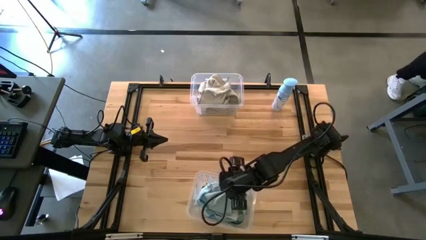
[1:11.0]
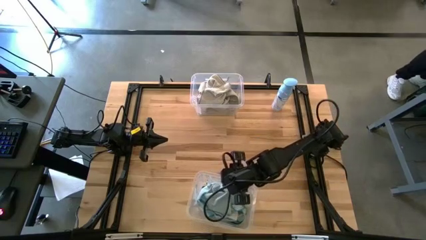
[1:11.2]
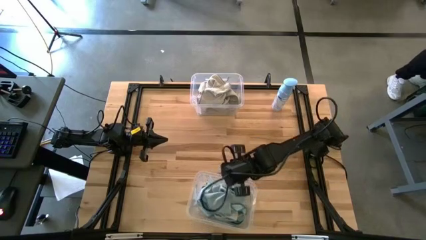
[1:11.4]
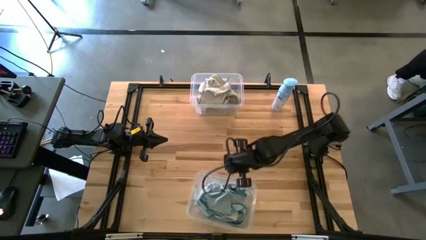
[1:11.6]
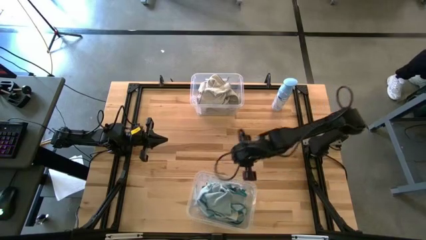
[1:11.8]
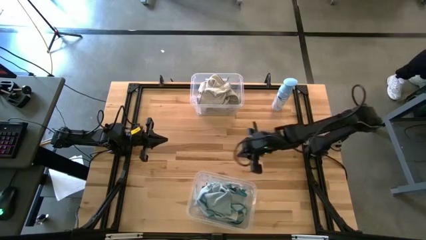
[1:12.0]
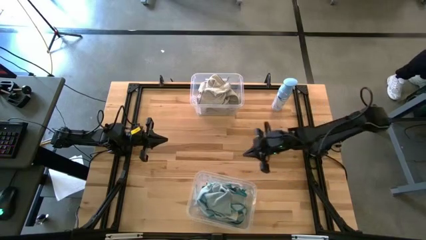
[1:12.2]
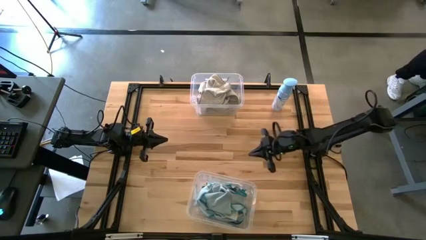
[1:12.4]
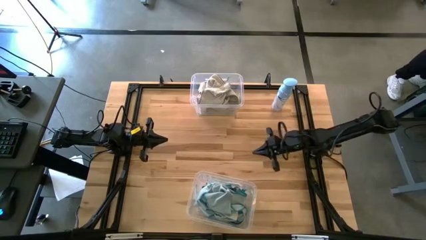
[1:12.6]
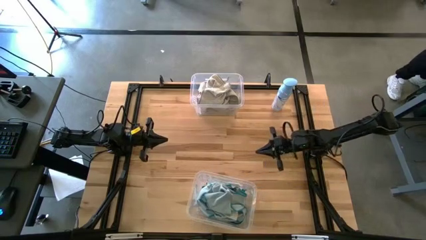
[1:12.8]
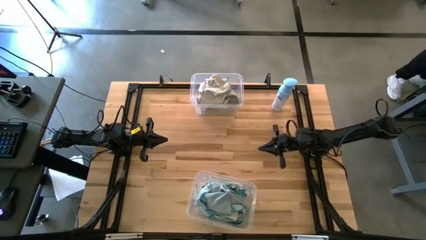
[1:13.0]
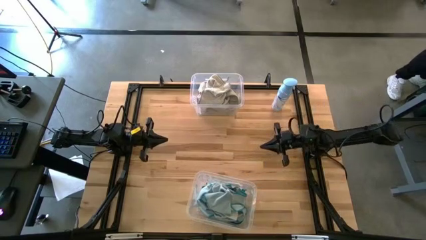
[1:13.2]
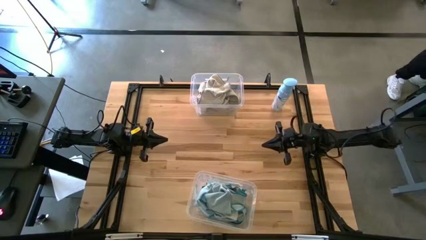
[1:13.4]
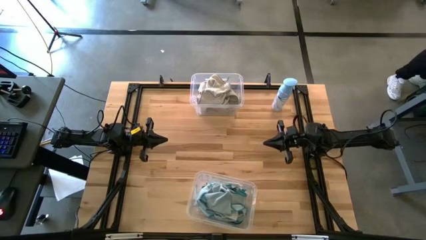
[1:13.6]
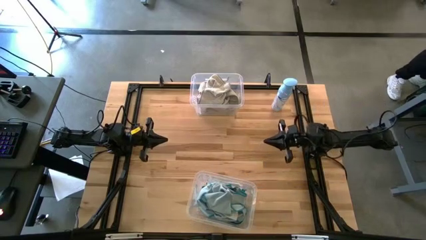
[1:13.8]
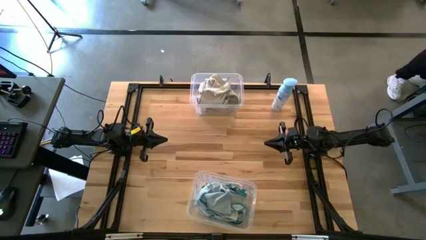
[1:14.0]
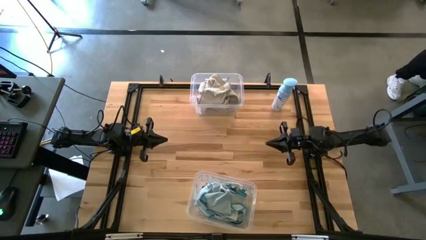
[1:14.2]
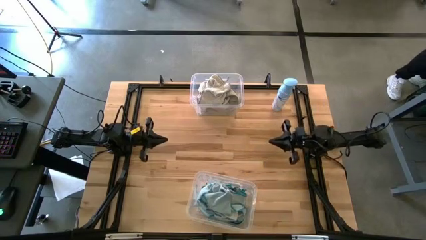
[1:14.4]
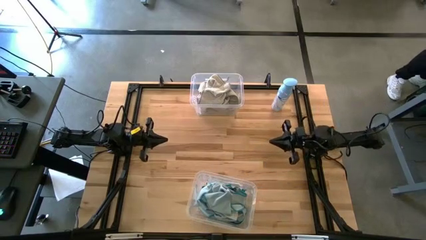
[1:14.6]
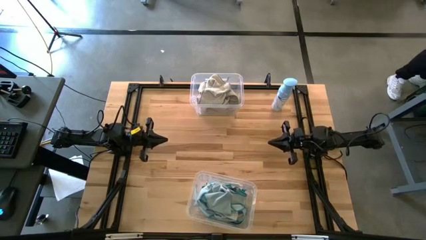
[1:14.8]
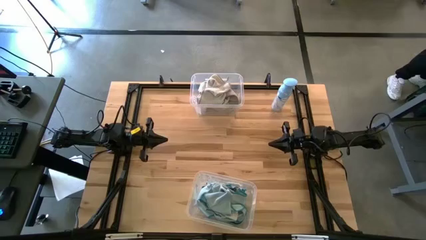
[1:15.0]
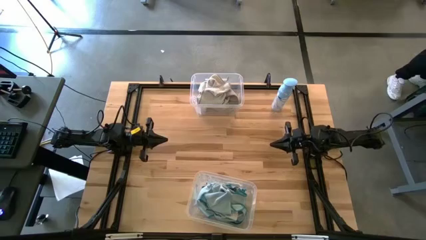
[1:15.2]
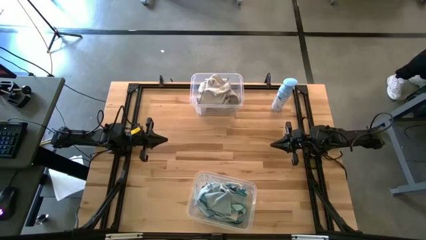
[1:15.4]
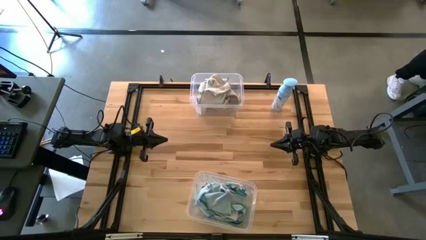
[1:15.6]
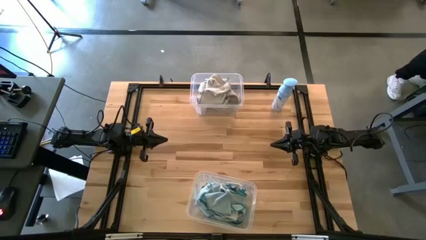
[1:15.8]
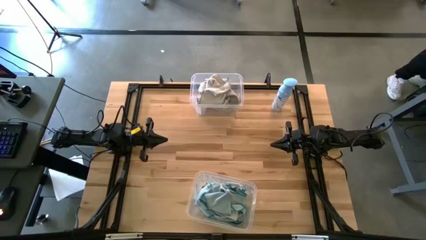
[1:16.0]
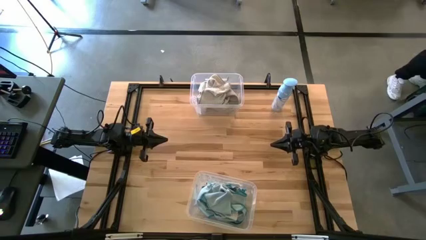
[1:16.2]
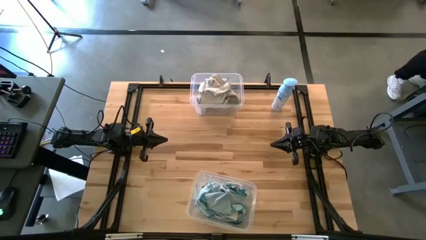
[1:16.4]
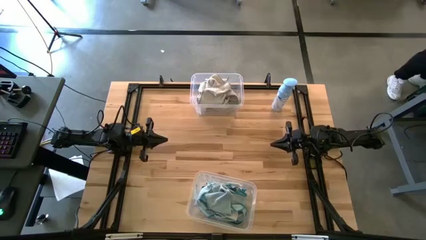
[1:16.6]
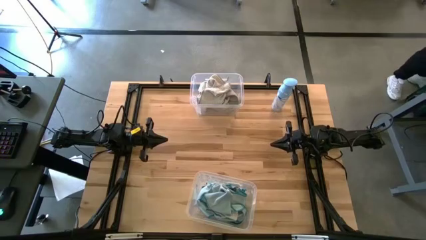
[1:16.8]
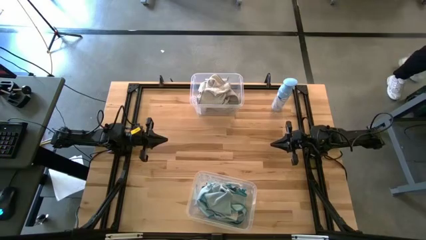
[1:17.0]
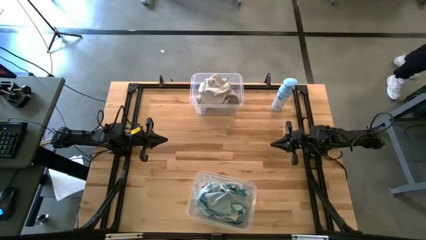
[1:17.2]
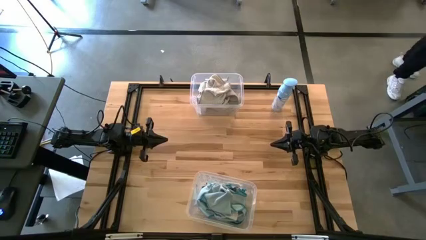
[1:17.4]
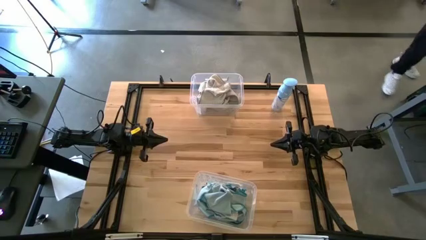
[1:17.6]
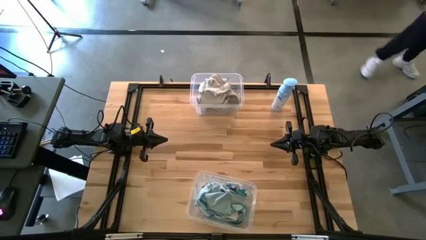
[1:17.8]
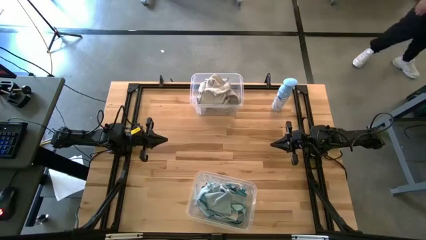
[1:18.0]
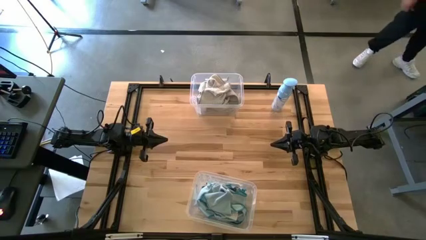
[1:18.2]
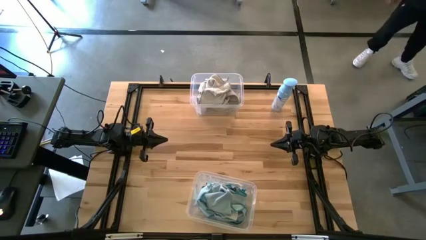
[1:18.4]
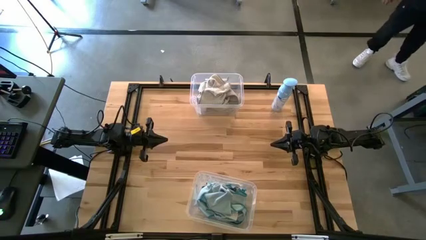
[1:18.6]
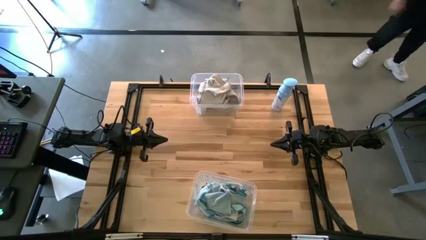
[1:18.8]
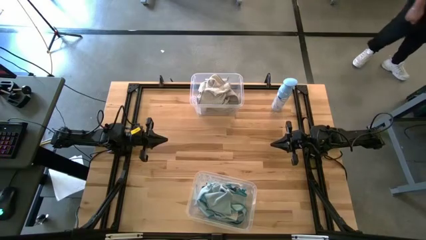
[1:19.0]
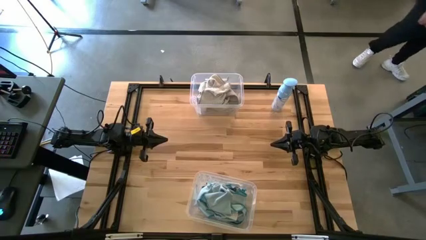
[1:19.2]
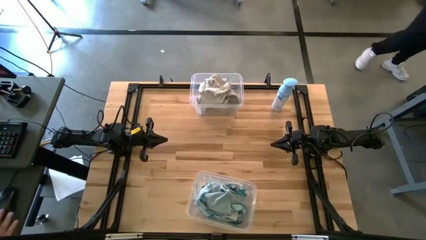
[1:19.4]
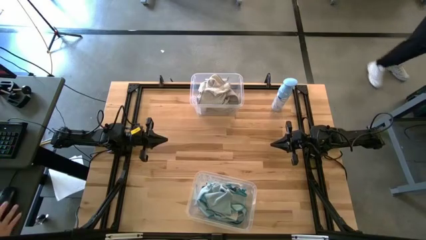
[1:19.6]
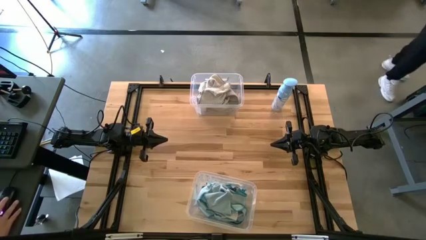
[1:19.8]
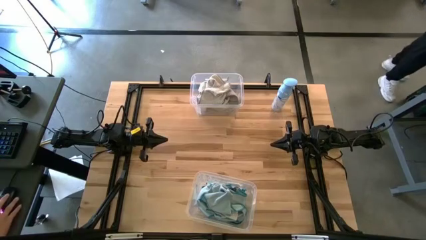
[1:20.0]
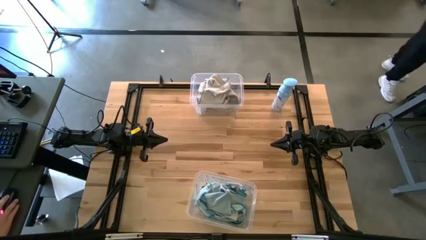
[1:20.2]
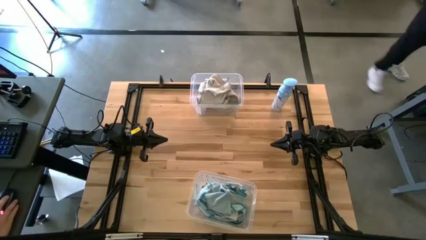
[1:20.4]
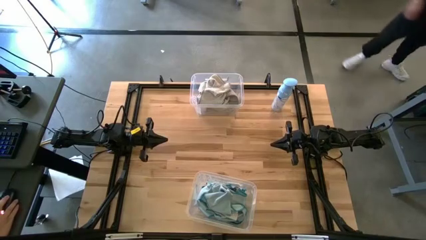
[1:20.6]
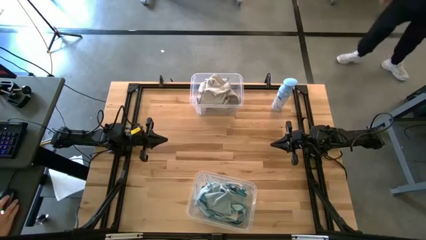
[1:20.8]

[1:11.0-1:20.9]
Task: Sort microfiber towel by color & place in baskets
Return to home position

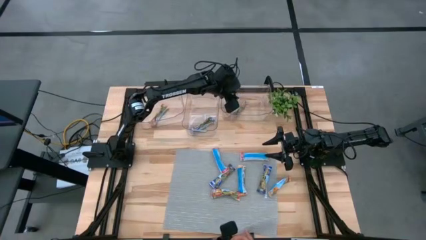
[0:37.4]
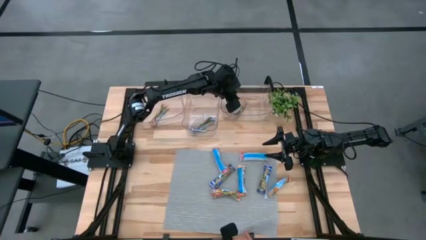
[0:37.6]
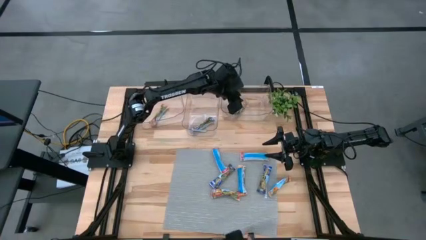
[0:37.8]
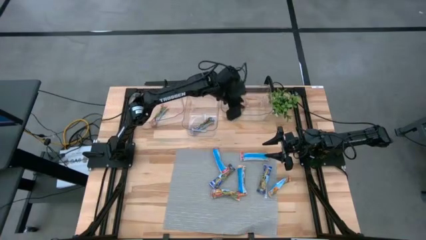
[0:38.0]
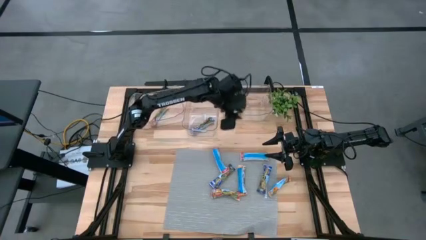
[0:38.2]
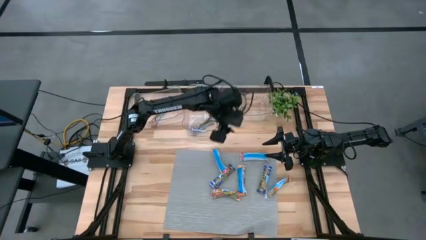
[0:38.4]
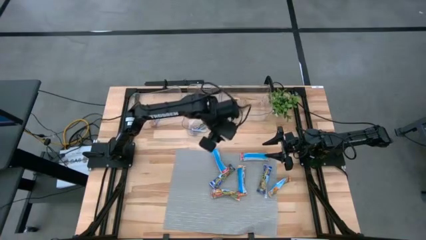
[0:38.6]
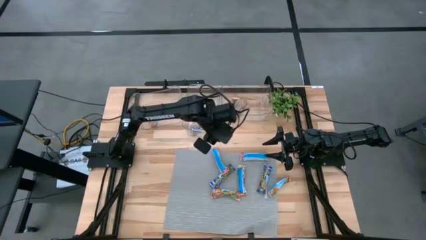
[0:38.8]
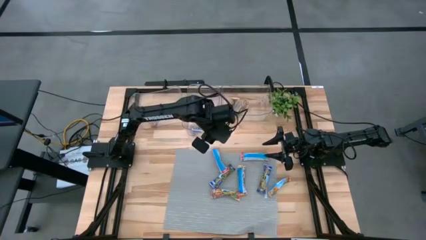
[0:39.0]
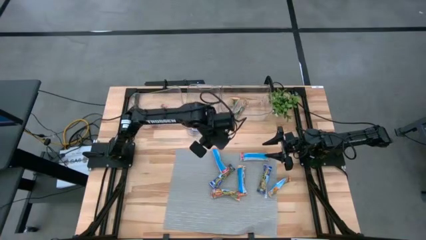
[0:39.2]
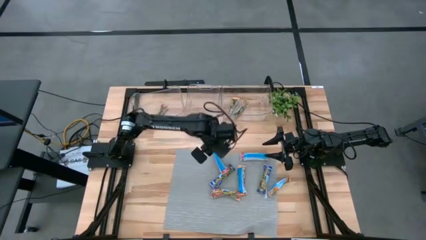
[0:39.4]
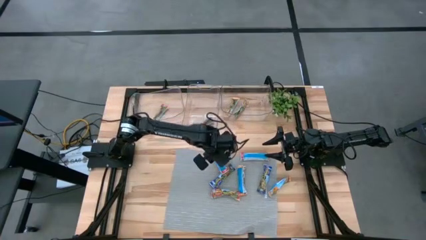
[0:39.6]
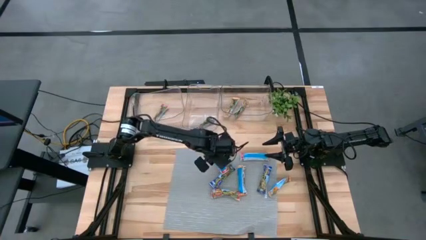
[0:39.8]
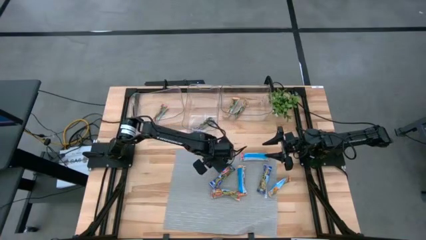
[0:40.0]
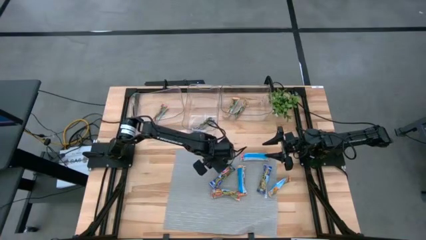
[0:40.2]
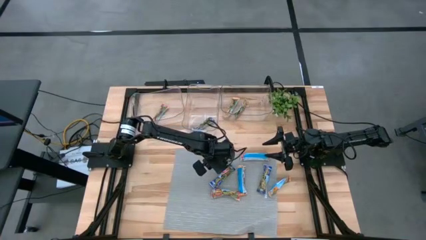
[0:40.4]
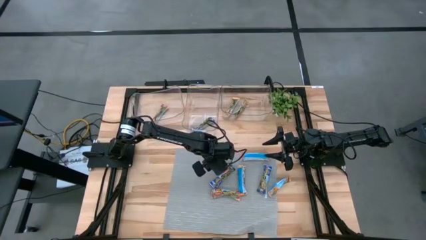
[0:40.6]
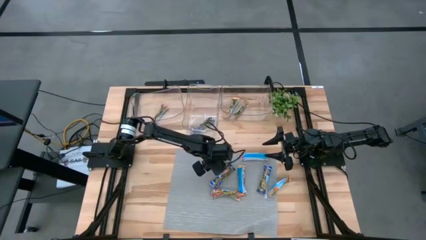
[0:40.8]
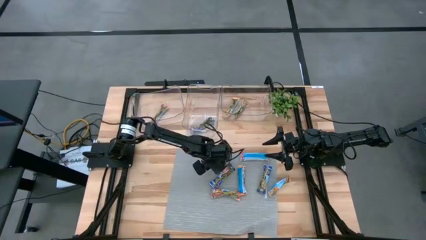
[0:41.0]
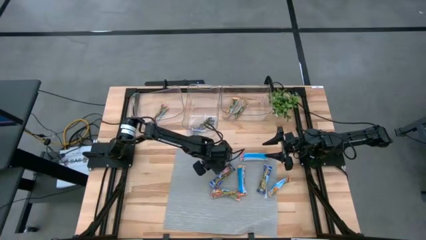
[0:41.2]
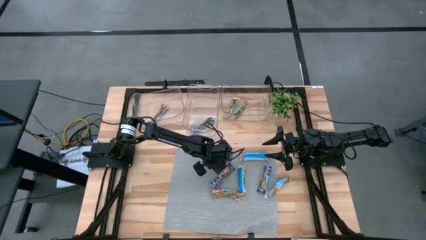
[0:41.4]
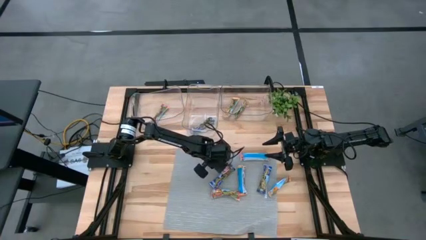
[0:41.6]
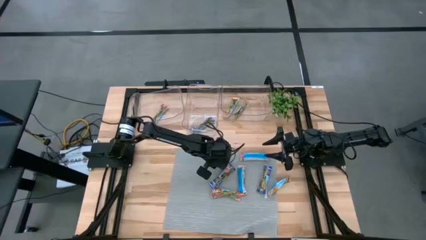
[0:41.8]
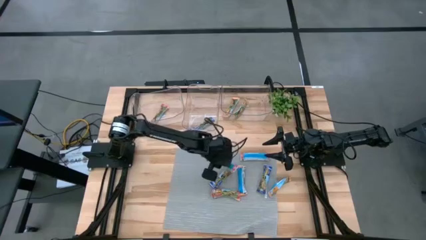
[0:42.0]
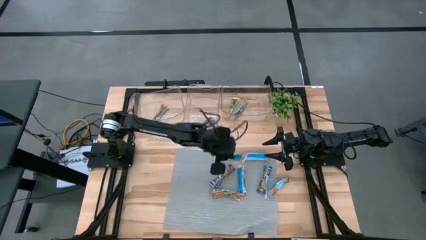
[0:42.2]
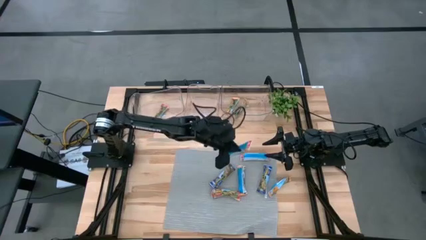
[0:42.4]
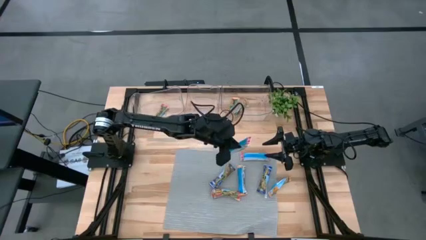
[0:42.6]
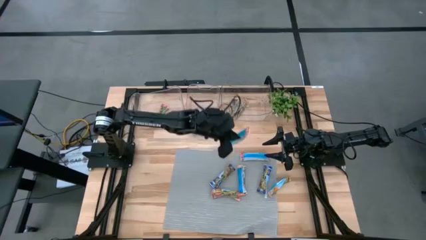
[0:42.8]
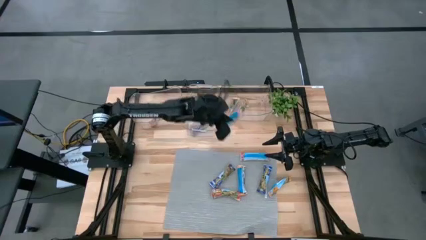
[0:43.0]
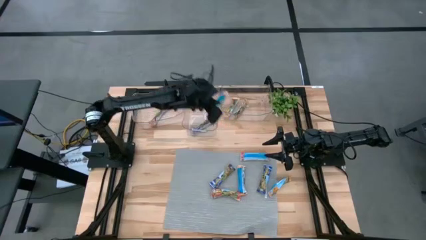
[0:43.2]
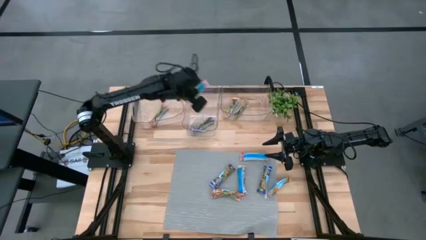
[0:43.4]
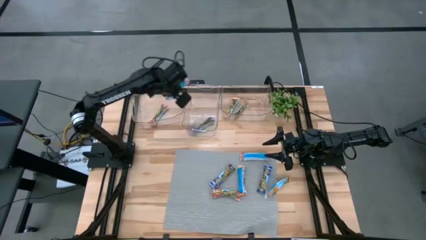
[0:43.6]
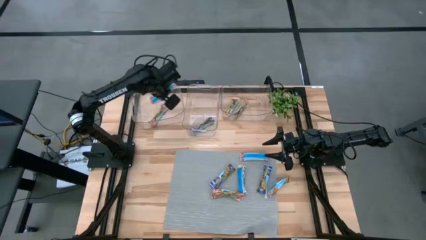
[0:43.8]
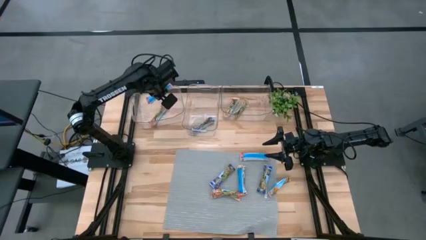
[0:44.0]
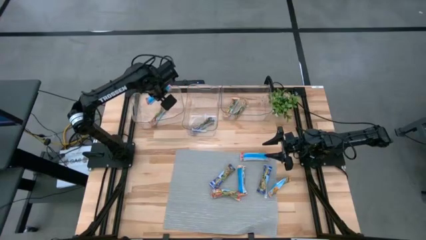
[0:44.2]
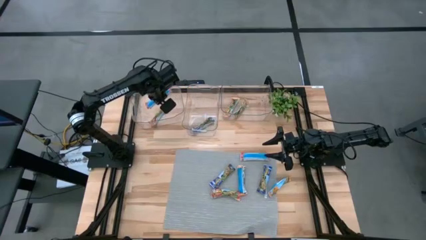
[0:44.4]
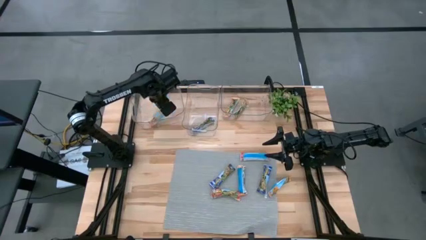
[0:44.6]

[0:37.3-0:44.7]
Task: Pick and place Granola Bars by type
Put the top left red granola bar into the left transparent bin
